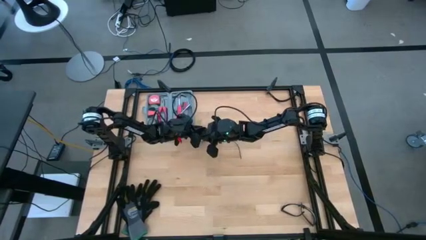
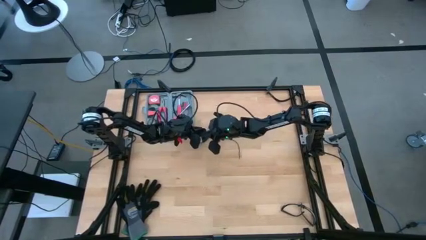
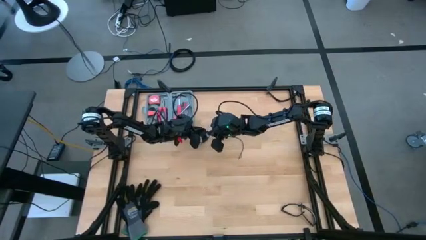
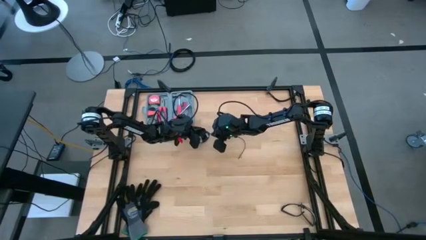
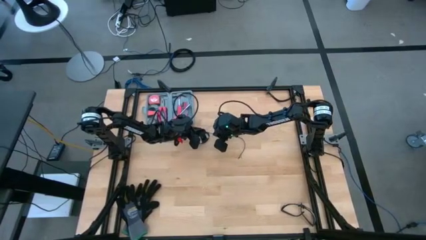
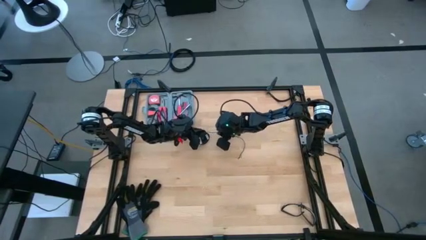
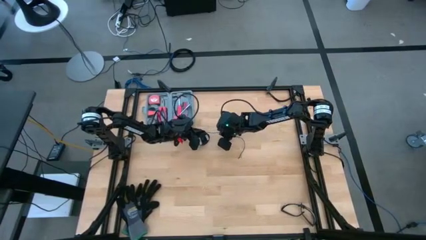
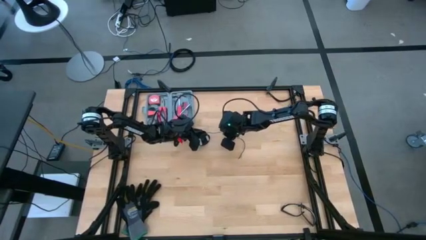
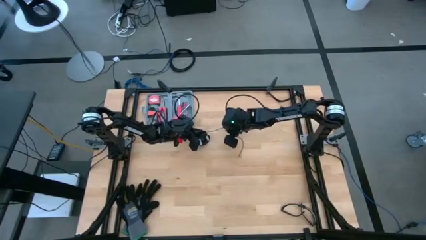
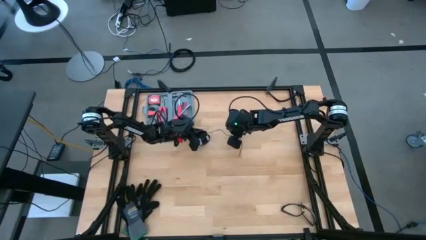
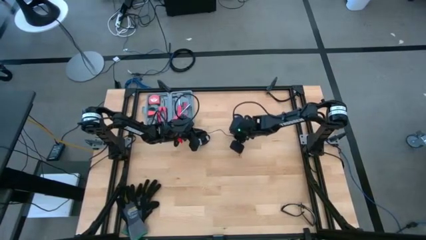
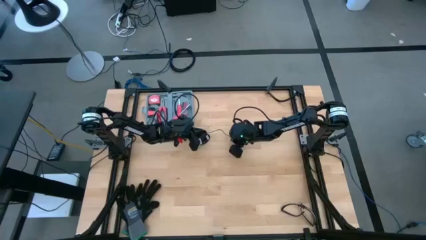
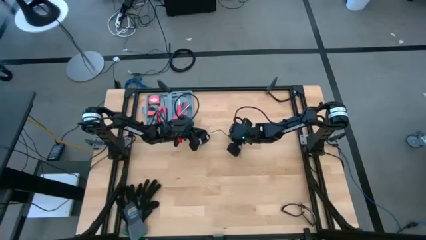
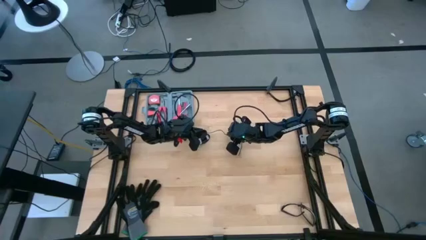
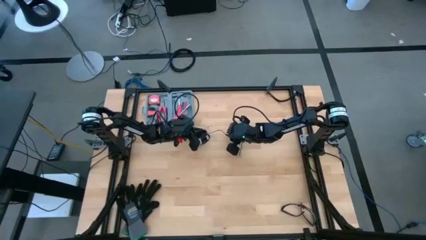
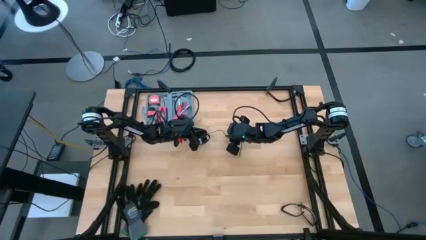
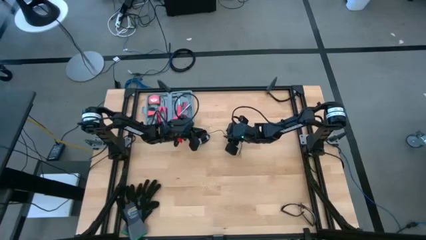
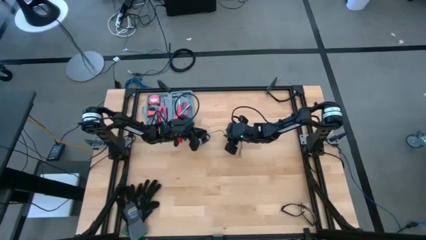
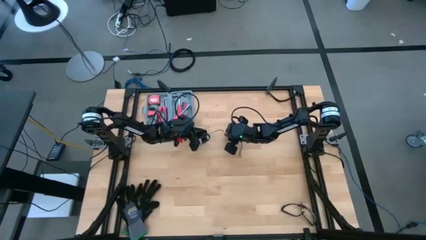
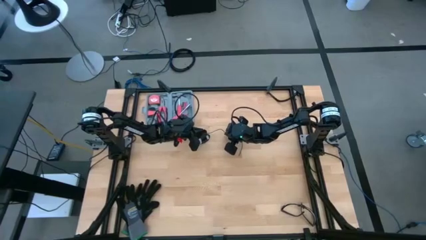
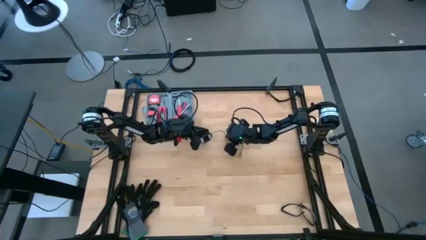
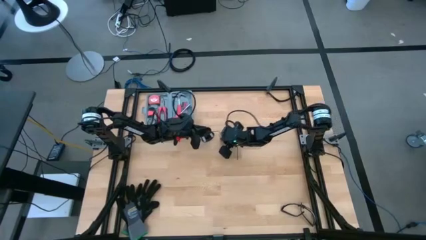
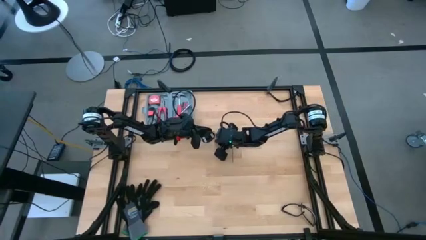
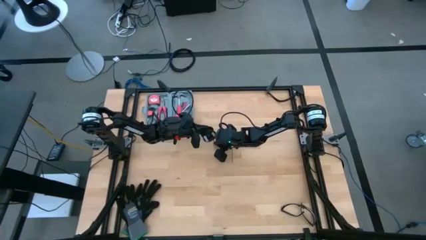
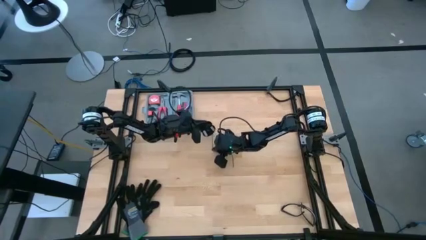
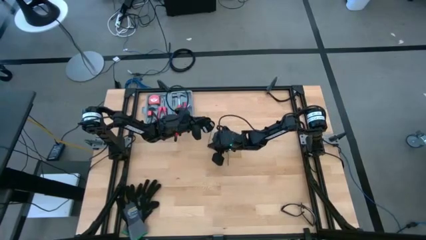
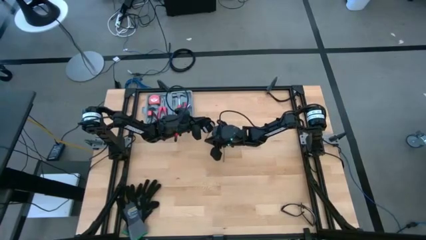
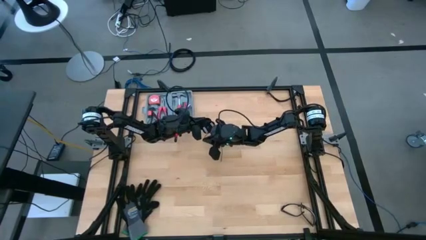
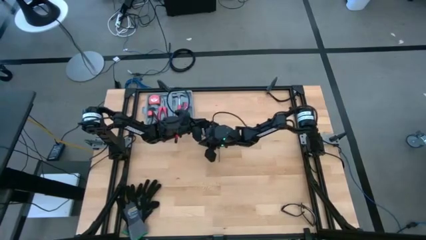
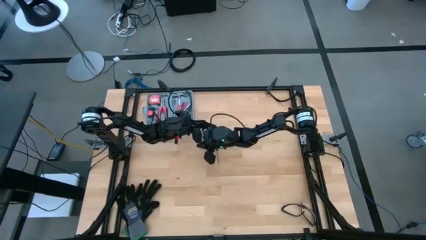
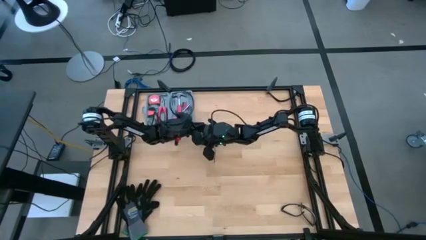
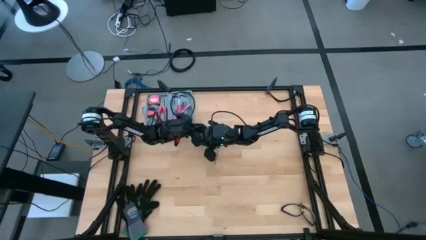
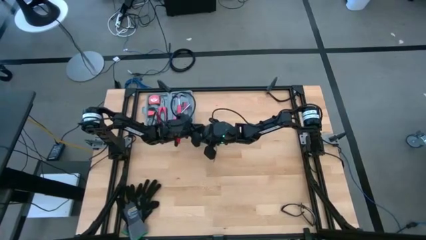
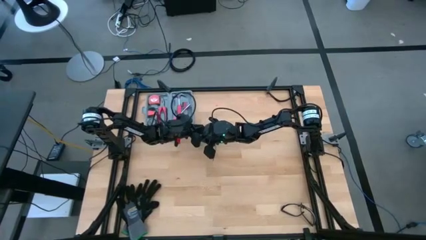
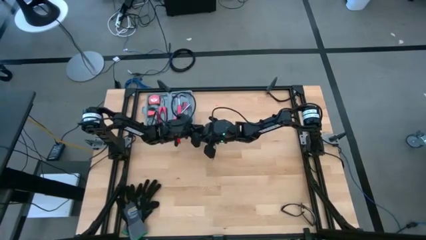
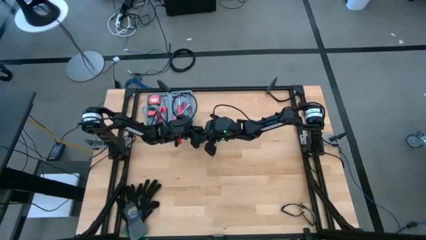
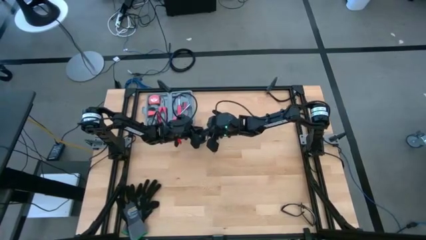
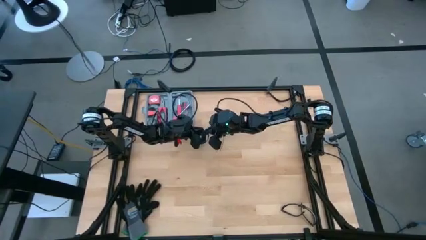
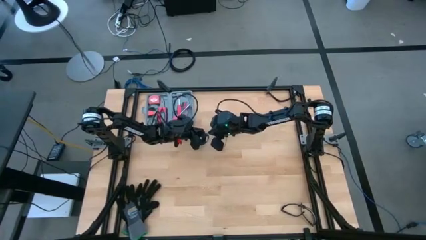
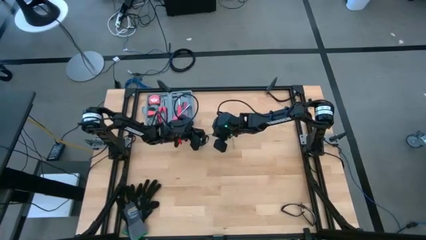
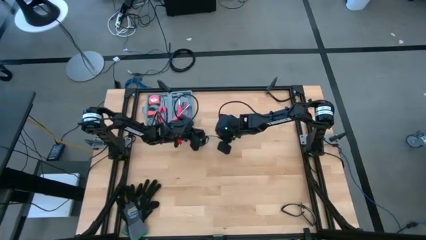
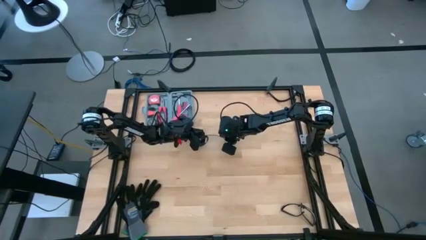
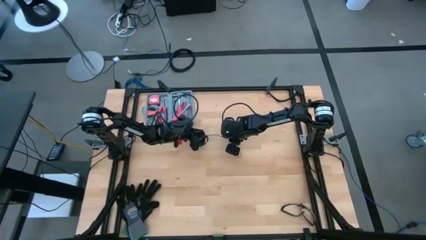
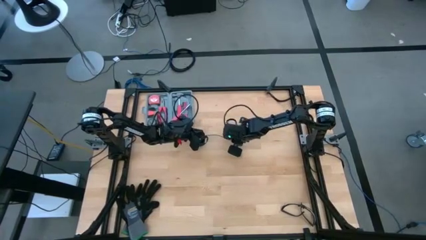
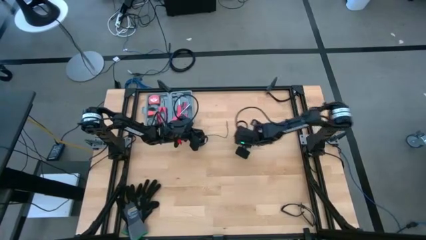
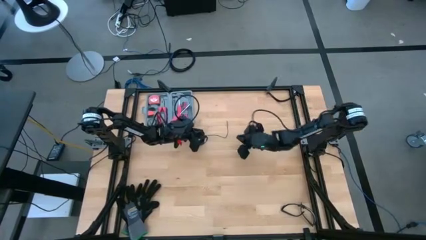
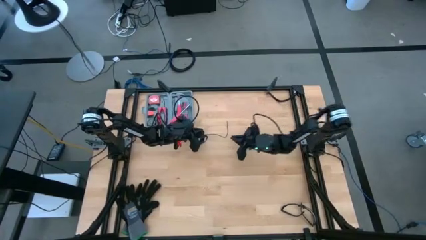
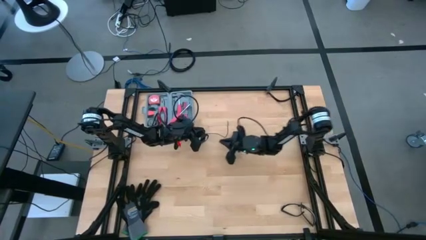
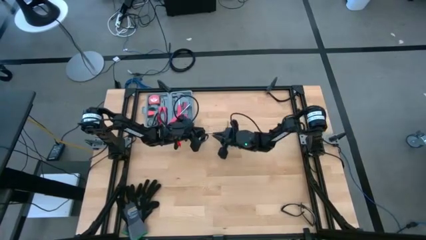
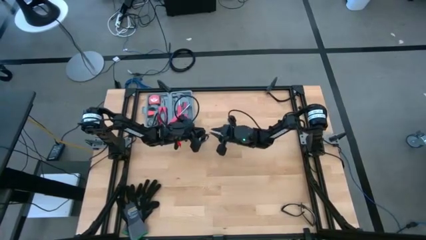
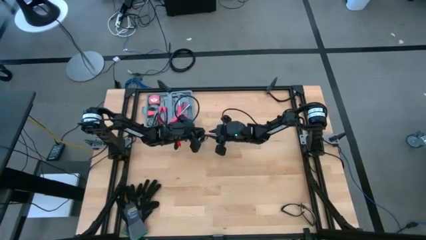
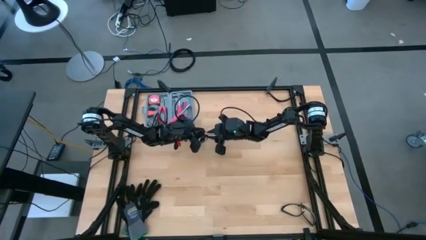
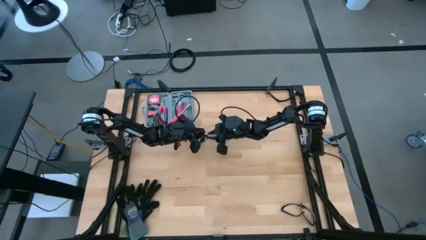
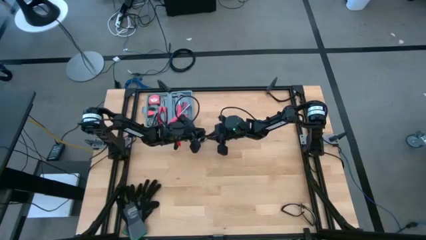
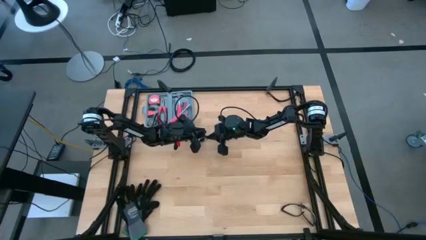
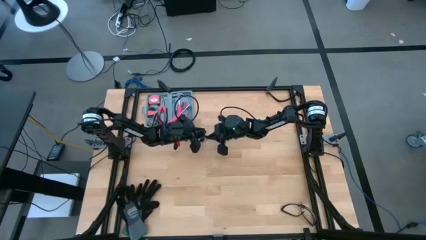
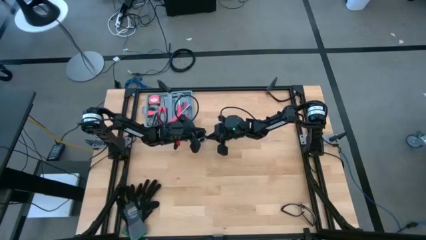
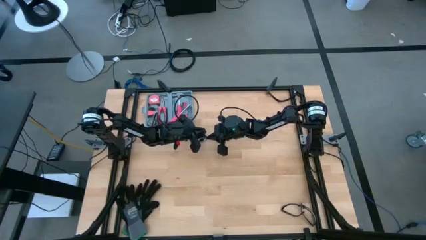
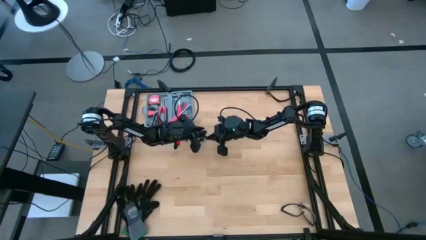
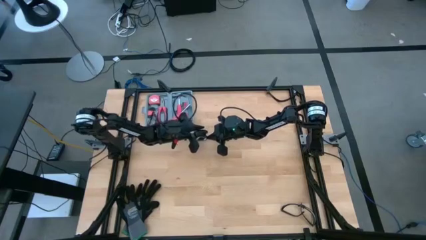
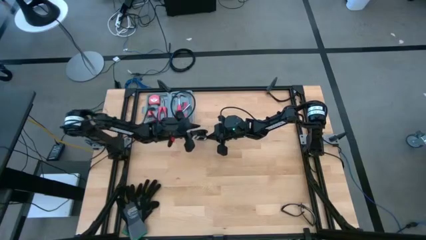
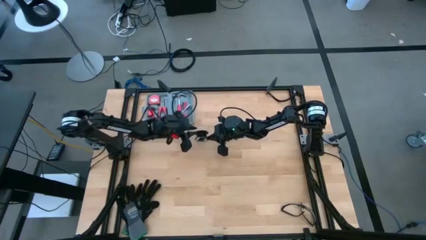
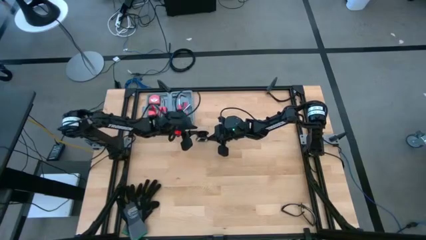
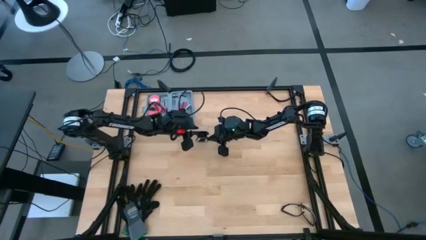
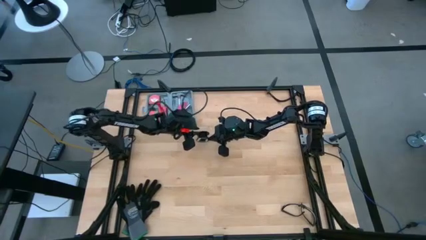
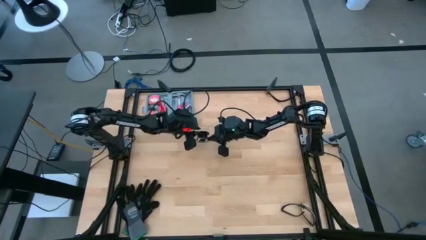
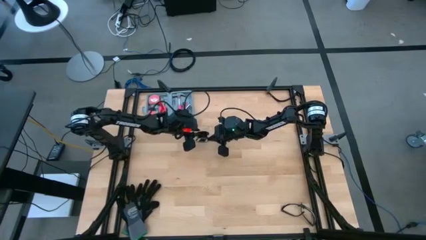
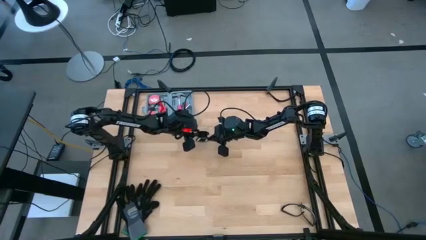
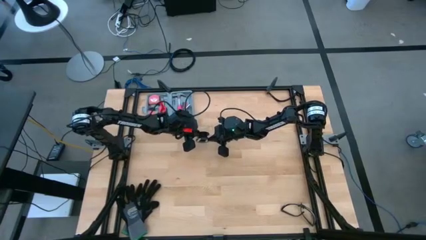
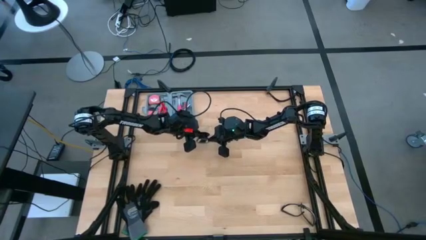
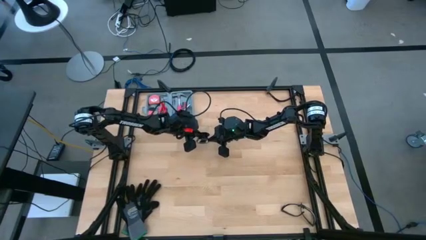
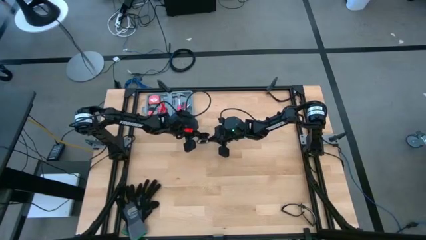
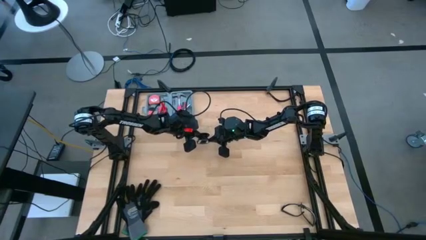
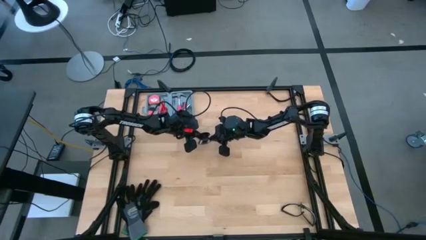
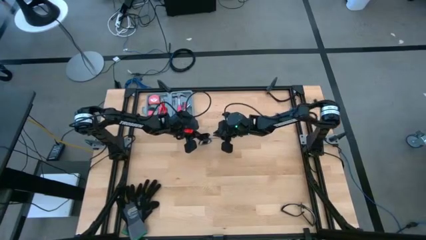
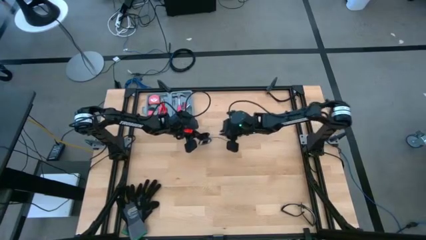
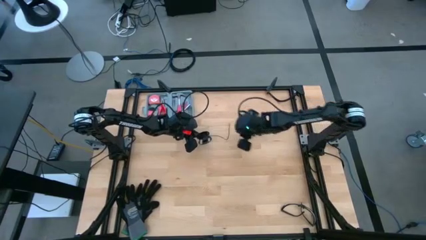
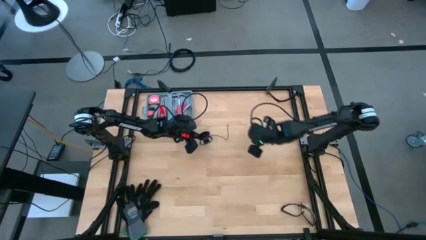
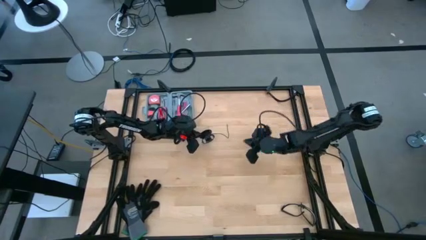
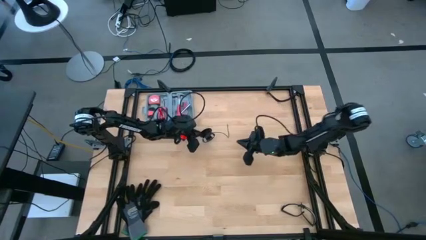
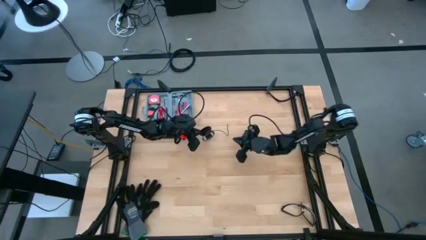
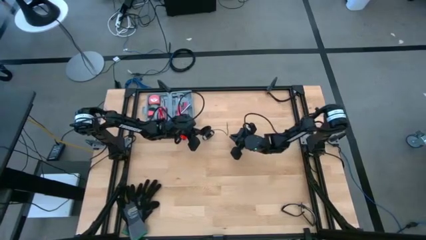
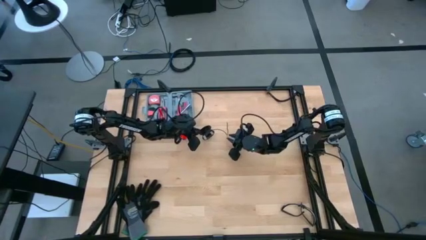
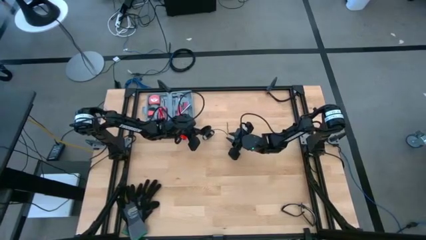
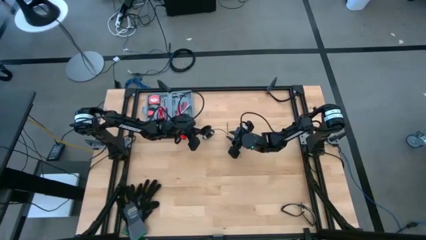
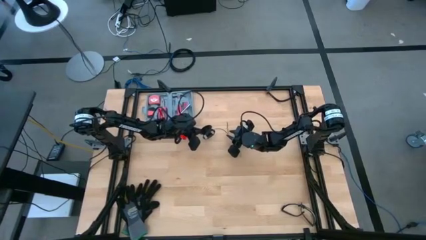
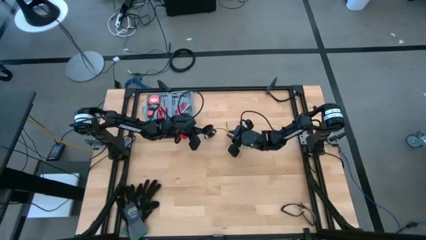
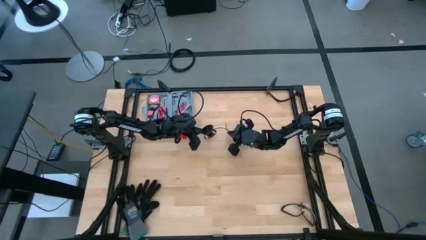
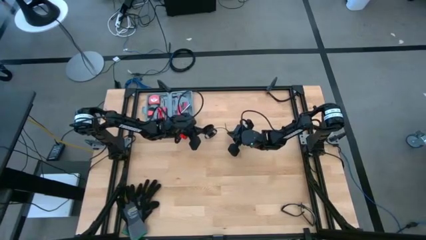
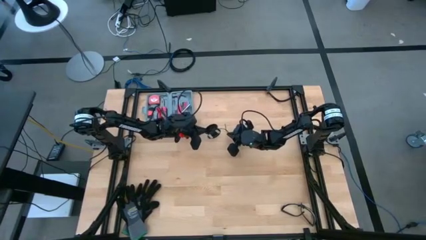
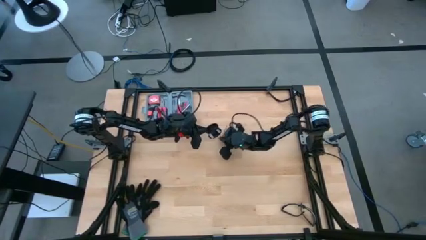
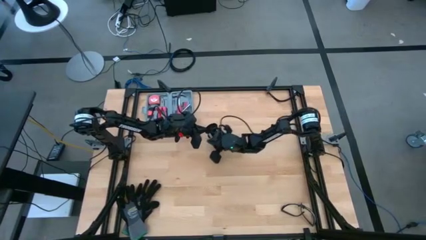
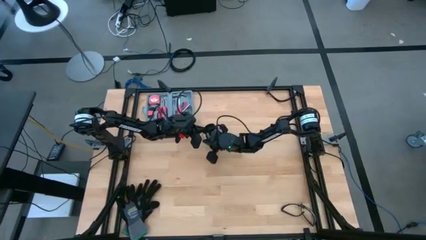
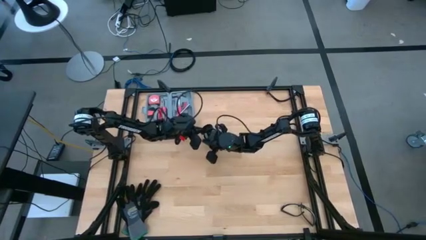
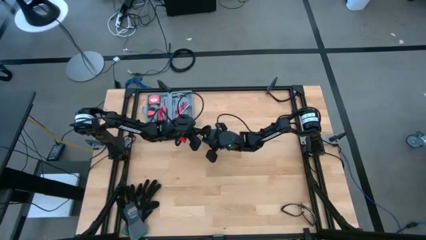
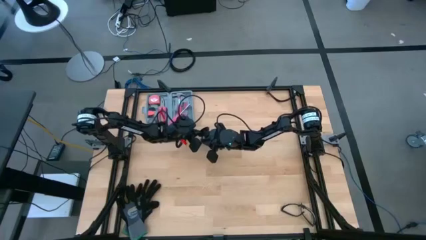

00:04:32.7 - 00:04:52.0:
Task: Coil cords
Coil the black wire onto the spool
